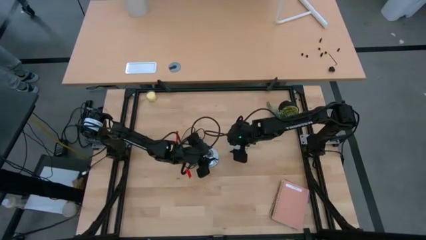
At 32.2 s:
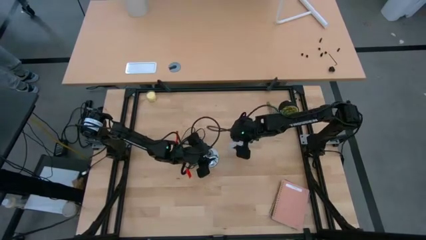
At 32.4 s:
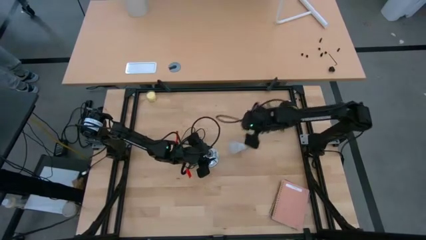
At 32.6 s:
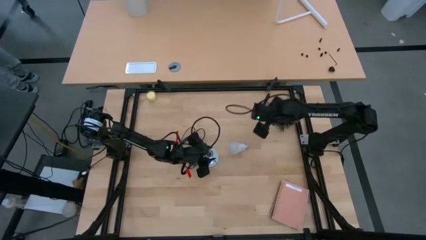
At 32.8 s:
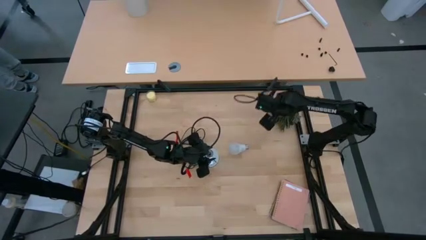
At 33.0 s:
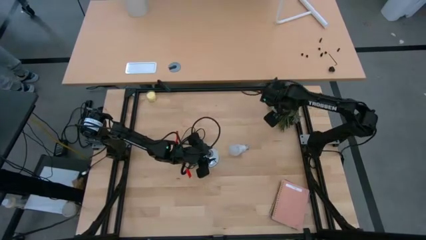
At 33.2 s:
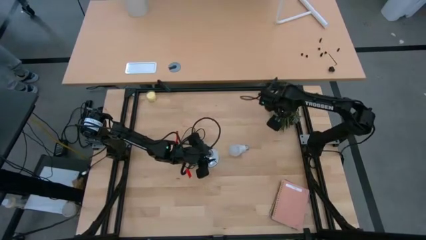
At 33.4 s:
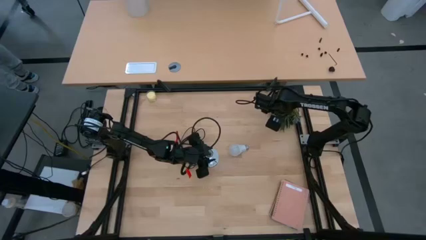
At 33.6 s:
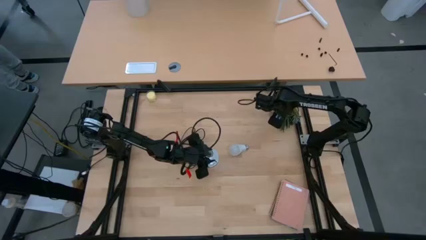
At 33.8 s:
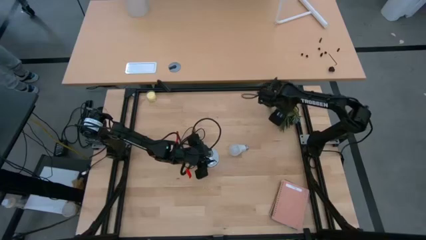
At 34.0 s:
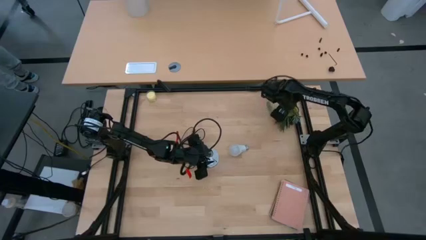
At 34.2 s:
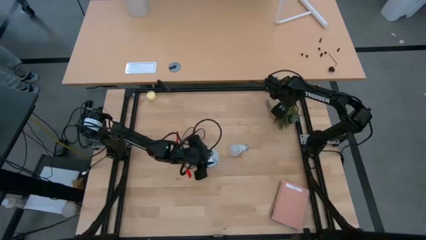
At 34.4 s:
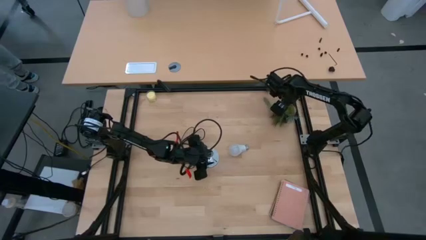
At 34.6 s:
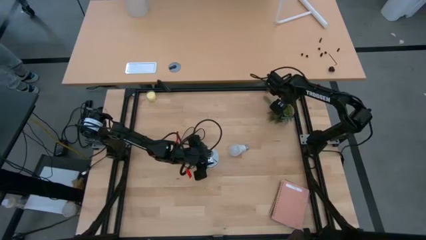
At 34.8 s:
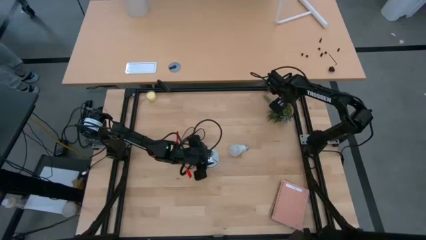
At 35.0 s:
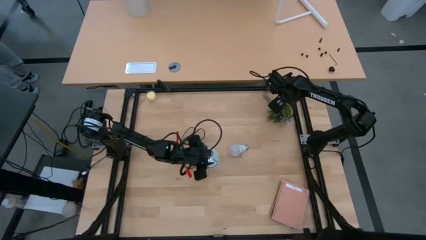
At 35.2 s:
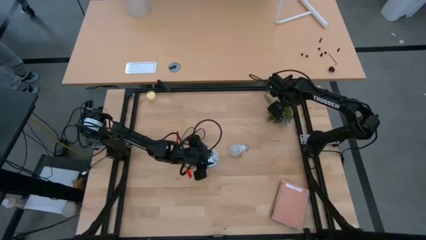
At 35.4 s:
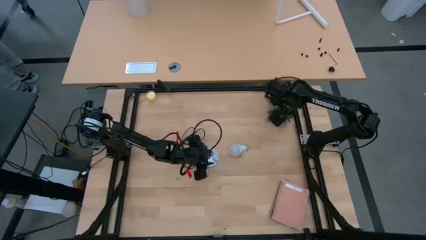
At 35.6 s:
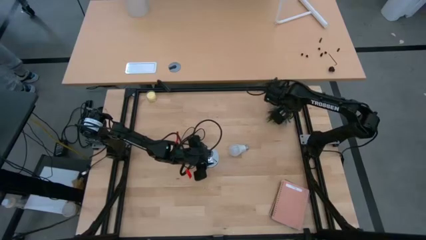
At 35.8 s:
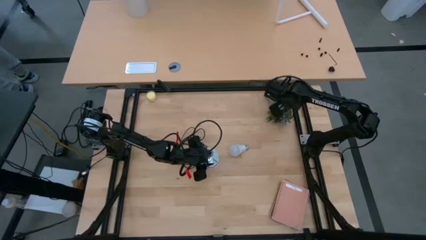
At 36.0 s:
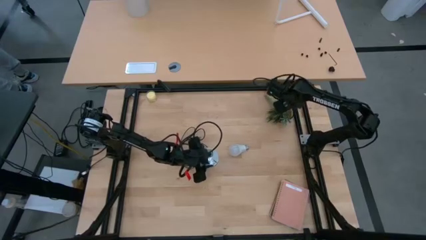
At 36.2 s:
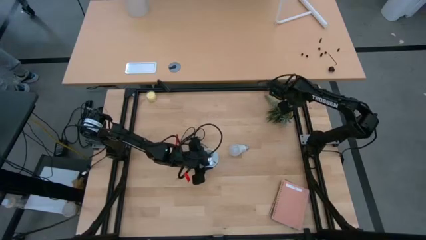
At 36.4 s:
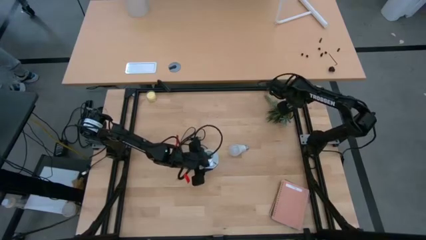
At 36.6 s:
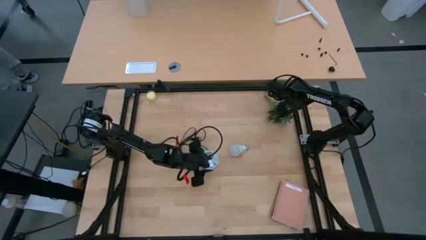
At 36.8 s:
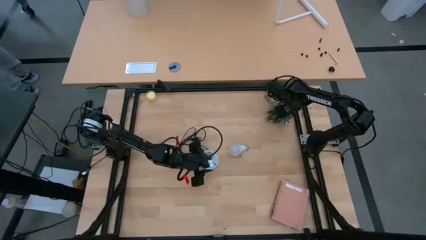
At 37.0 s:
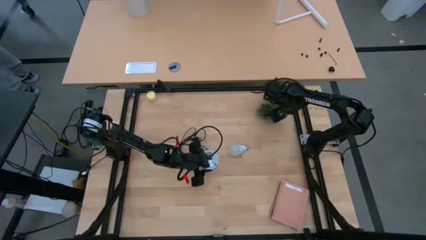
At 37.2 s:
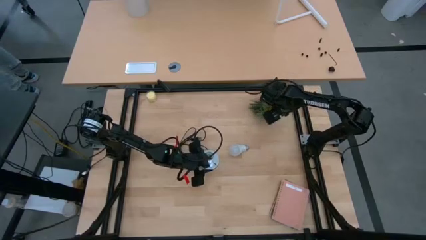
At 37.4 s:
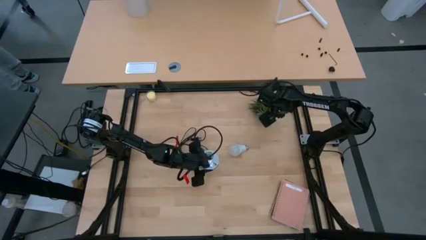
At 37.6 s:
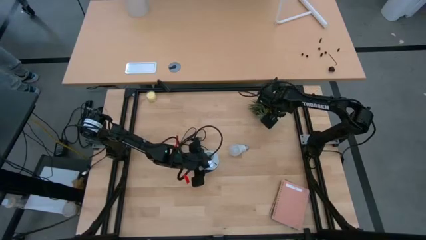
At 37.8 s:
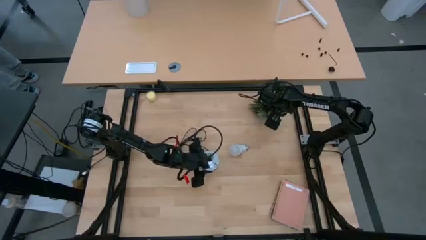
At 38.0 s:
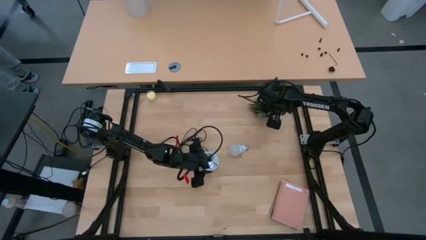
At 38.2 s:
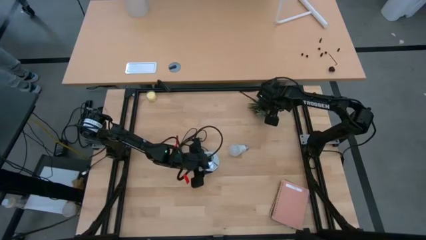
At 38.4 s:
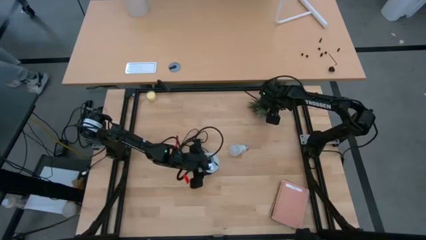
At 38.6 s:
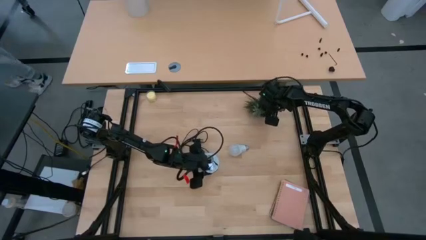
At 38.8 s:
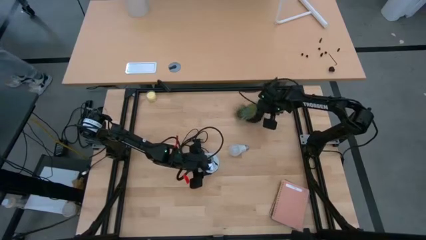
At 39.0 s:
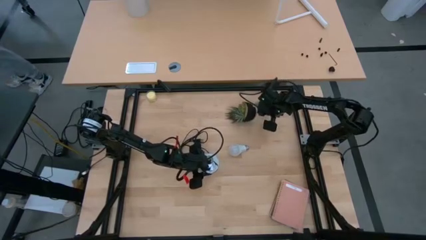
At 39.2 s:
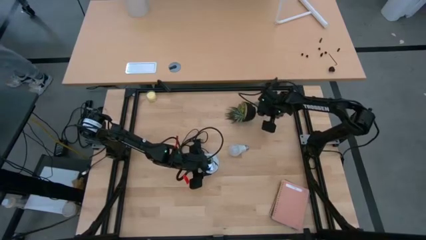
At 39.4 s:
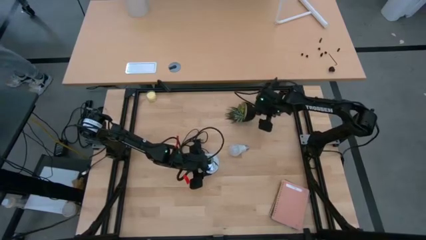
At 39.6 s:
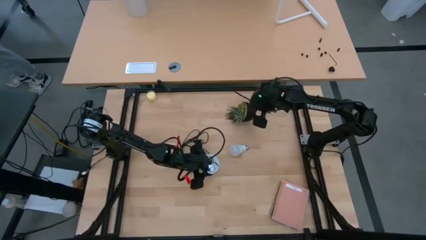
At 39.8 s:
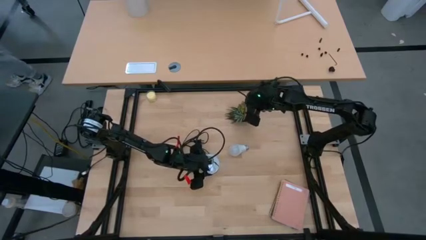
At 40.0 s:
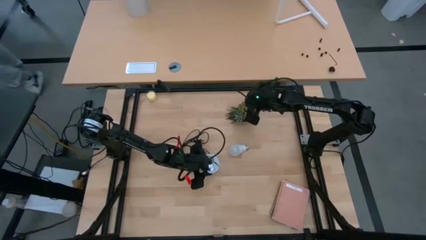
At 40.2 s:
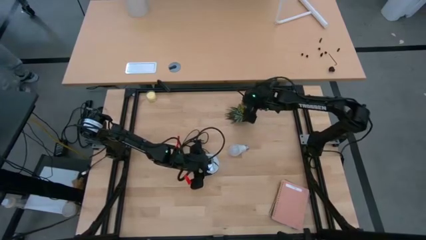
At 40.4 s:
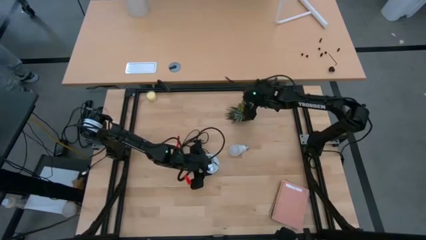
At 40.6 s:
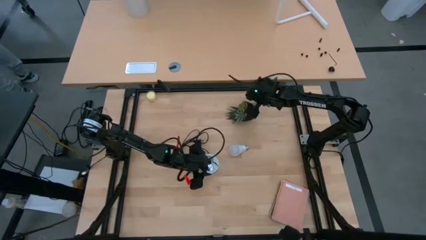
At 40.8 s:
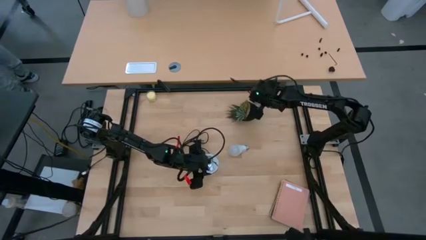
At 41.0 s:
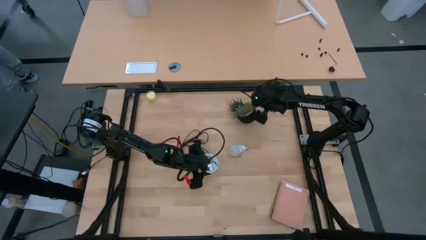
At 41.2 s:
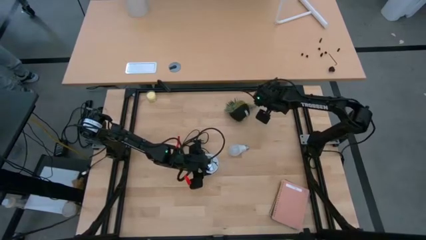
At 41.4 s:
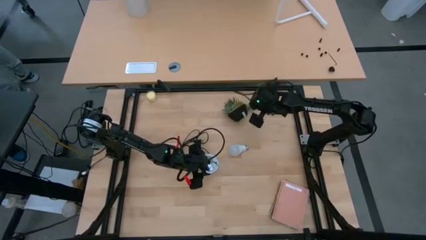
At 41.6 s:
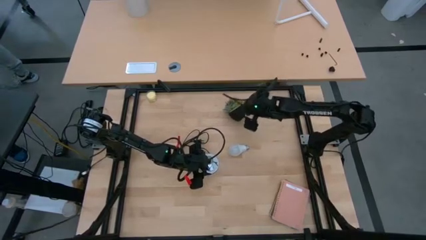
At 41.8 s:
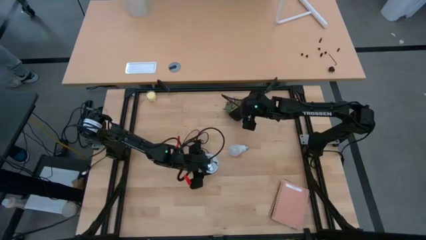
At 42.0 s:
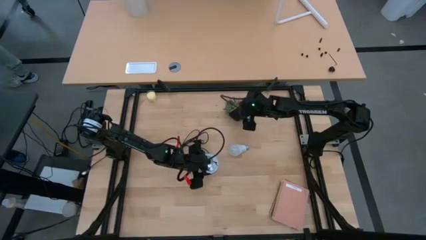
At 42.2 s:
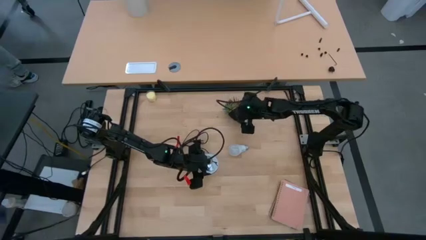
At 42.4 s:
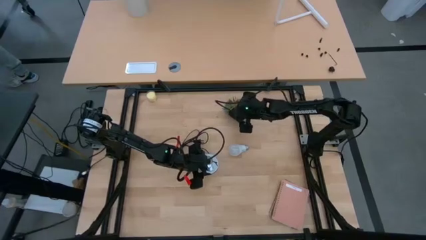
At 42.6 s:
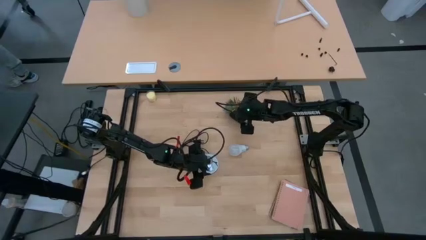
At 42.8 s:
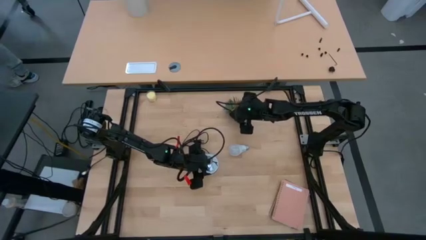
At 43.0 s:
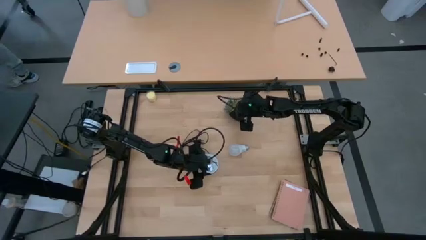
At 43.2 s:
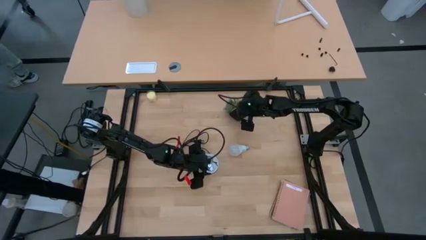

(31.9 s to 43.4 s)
Task: Screw lightbulb
Adjust the potted flower
